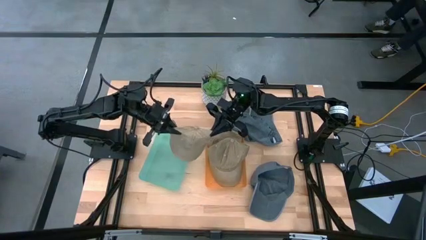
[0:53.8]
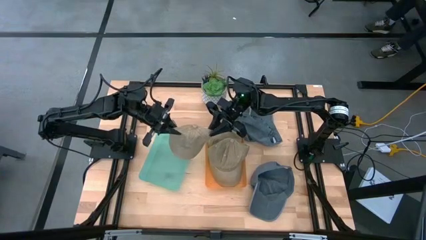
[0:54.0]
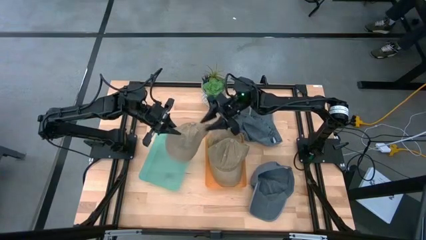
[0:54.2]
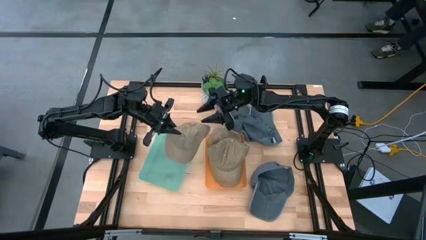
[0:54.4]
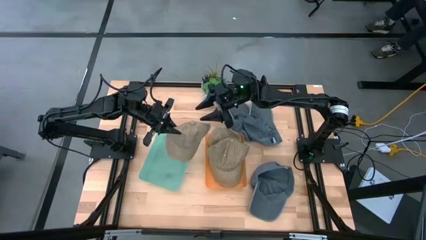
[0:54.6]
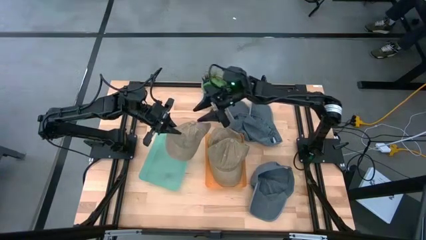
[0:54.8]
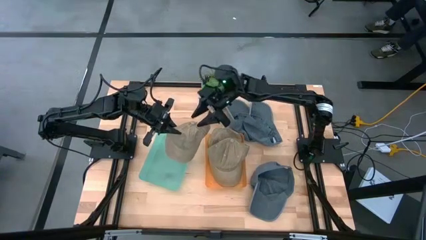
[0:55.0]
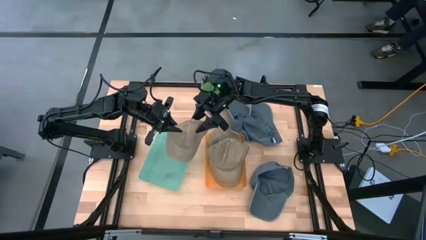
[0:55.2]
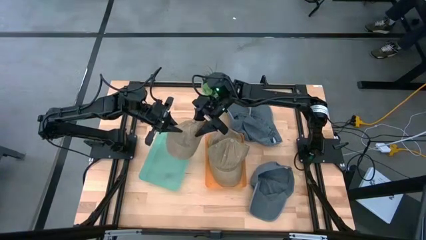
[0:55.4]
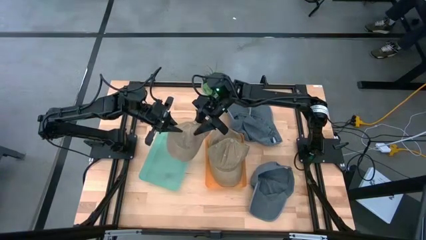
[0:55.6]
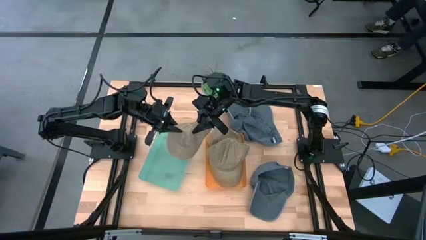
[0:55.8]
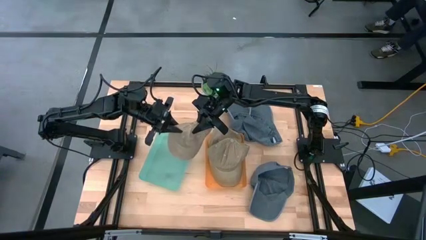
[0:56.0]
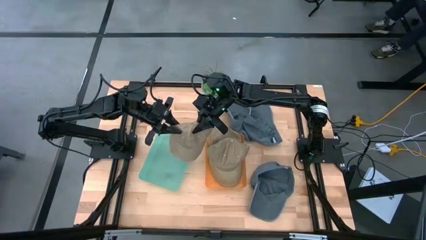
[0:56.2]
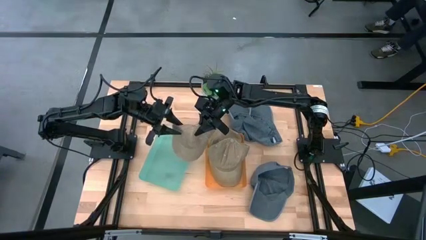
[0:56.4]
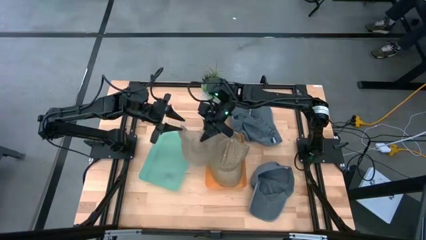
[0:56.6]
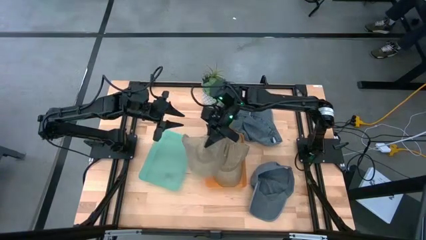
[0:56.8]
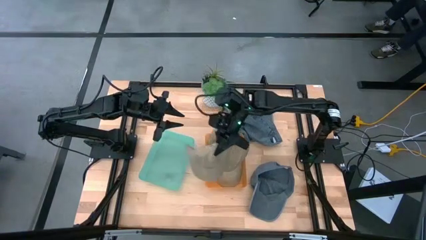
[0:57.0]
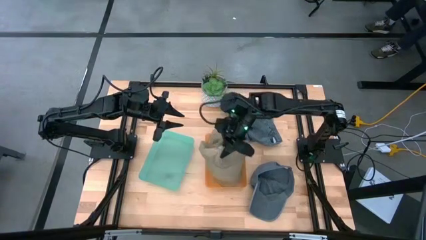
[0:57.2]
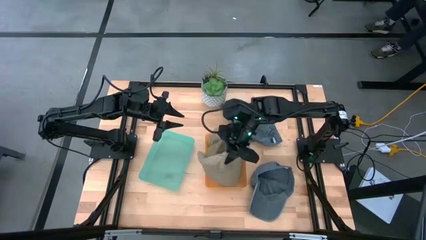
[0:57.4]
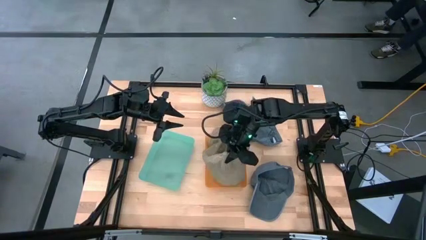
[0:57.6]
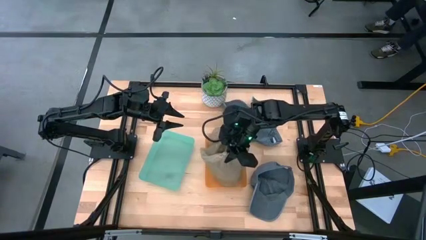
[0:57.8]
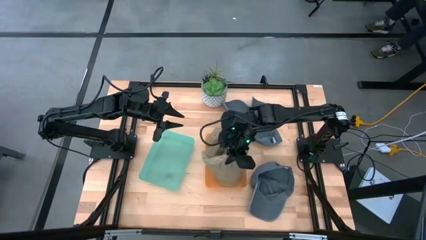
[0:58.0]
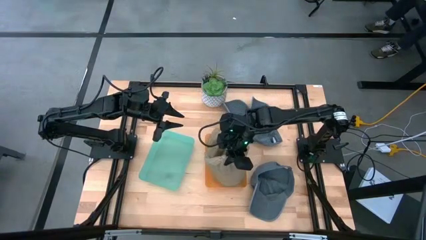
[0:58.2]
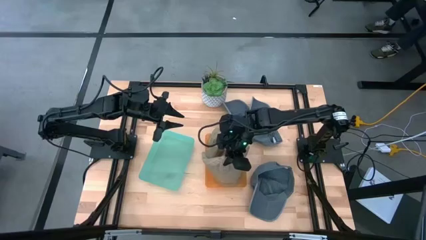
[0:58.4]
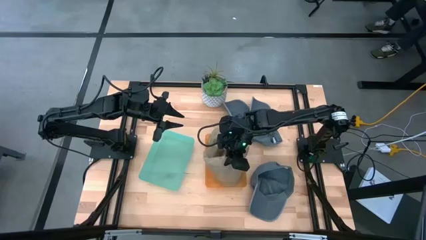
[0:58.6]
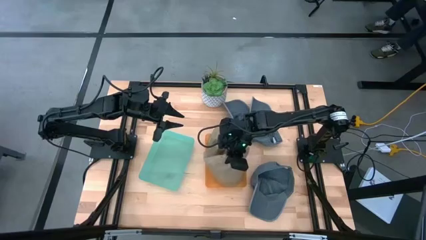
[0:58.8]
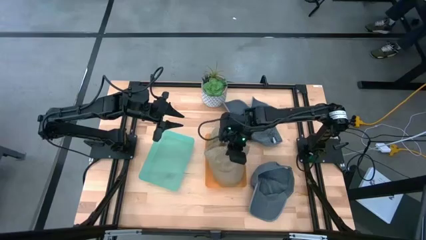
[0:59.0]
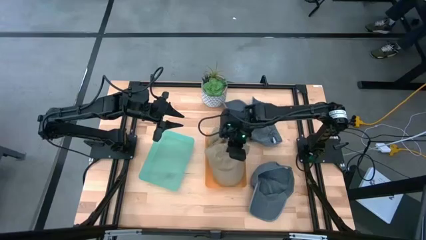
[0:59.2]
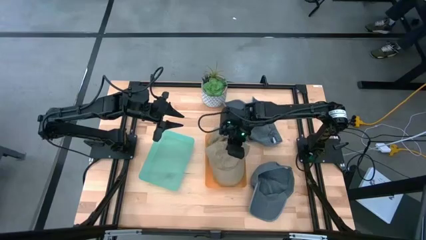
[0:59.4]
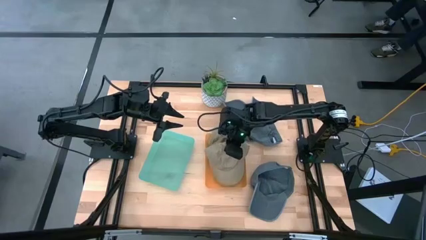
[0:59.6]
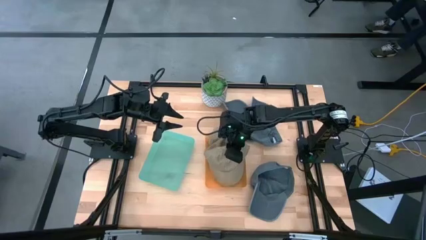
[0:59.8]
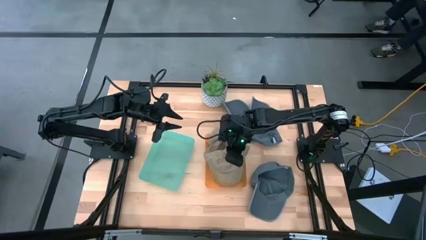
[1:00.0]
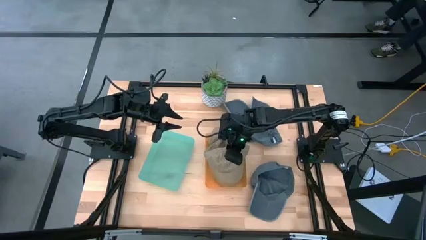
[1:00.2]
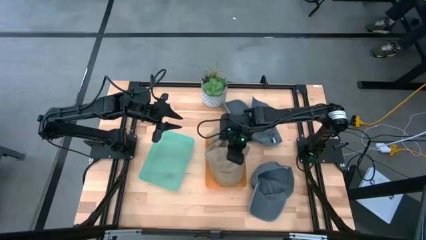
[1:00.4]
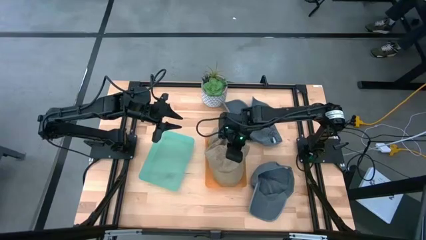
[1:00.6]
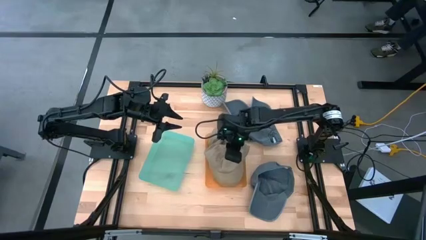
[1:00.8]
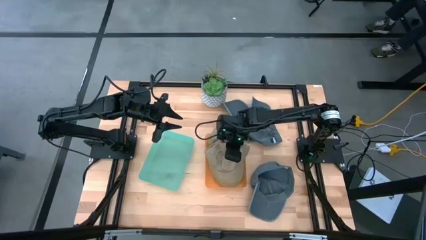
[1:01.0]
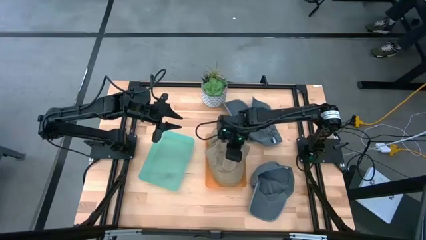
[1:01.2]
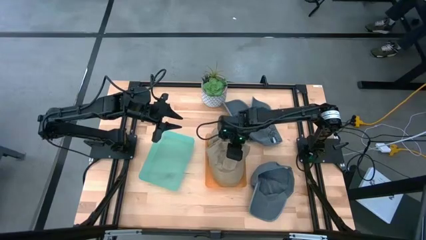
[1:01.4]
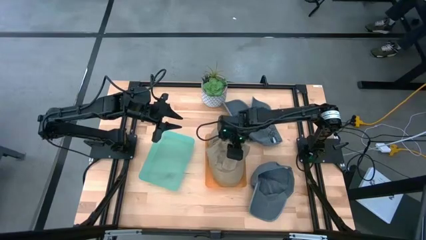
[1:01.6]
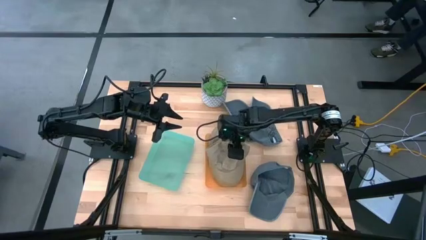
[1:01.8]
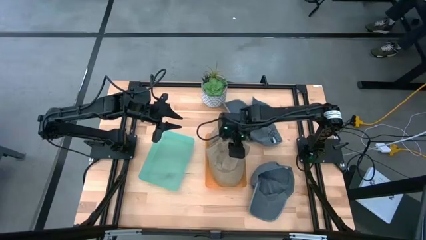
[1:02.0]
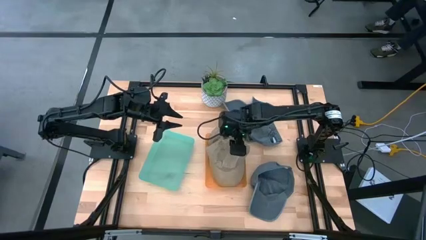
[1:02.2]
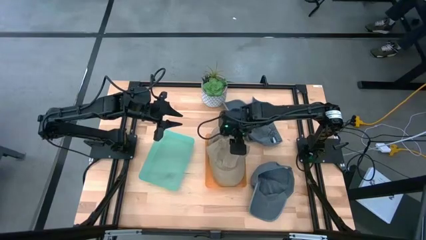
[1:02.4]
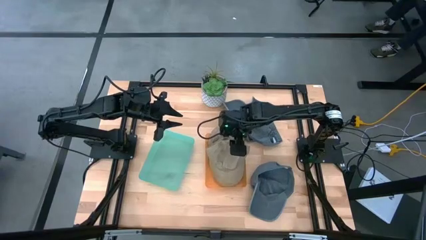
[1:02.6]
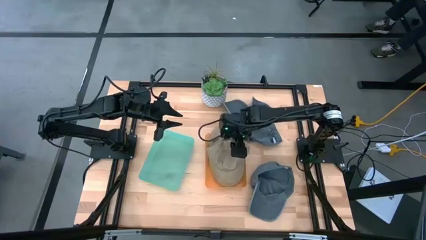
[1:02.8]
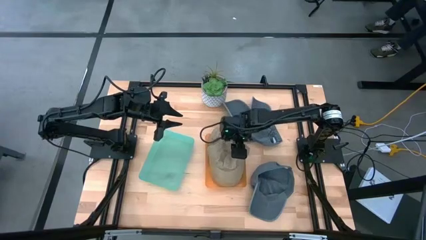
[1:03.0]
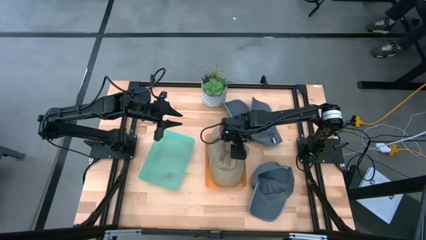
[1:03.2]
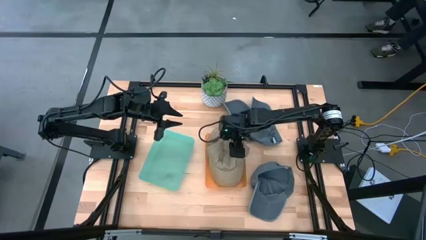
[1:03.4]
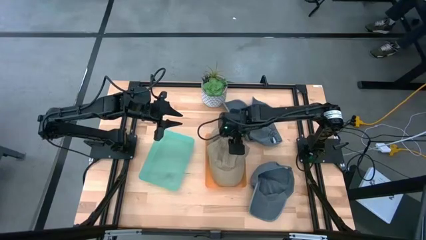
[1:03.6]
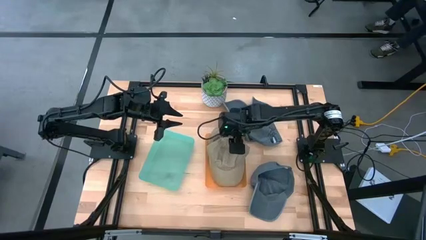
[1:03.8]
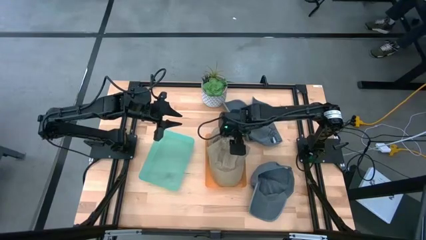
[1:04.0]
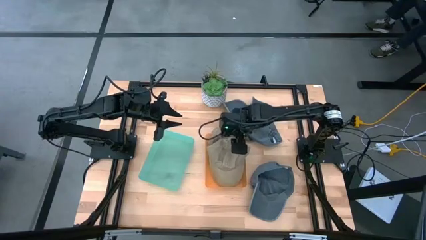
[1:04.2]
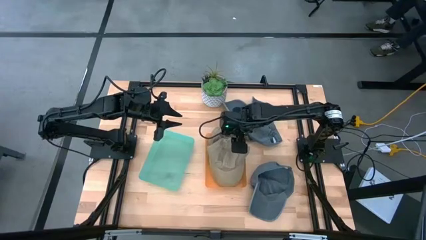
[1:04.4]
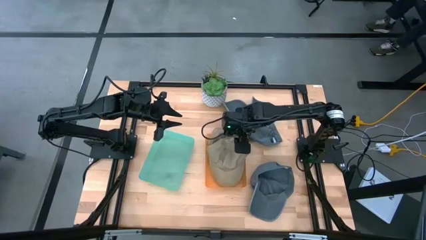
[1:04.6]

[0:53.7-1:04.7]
Task: Pick & Place hat
Put the brown cap into the orange bin
